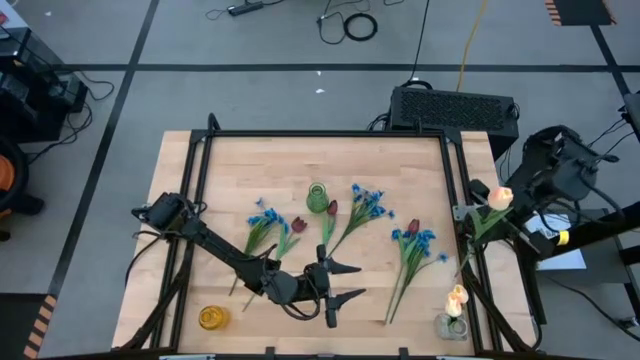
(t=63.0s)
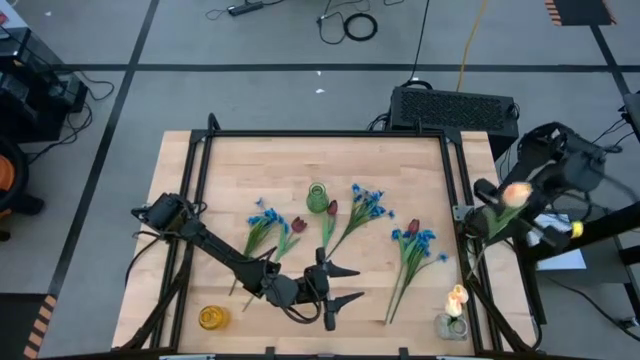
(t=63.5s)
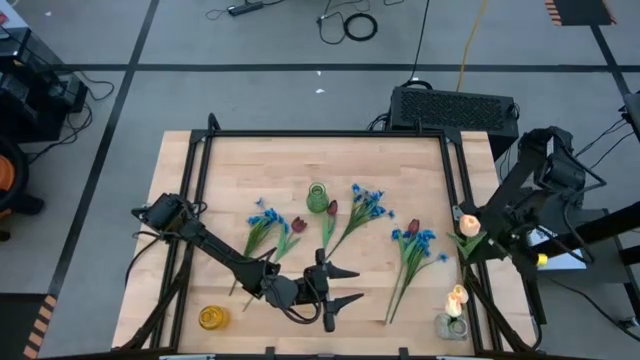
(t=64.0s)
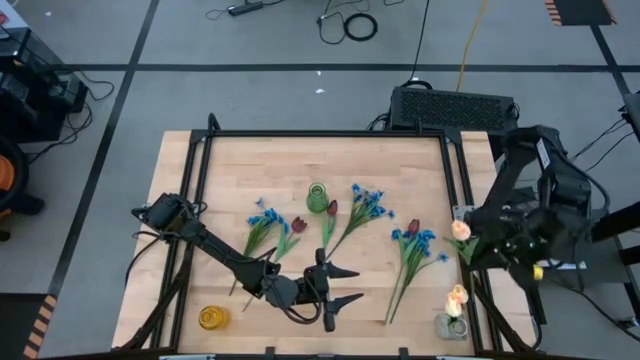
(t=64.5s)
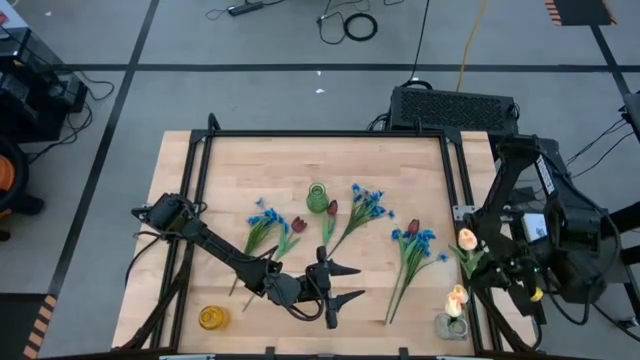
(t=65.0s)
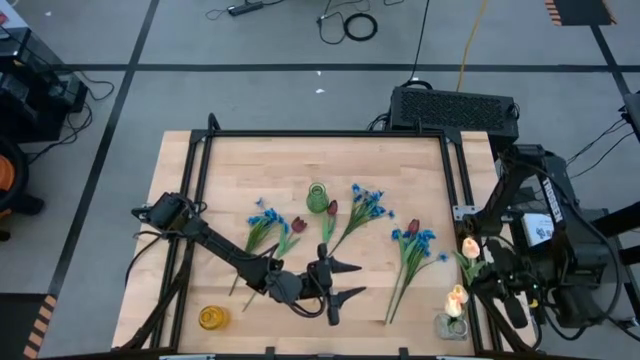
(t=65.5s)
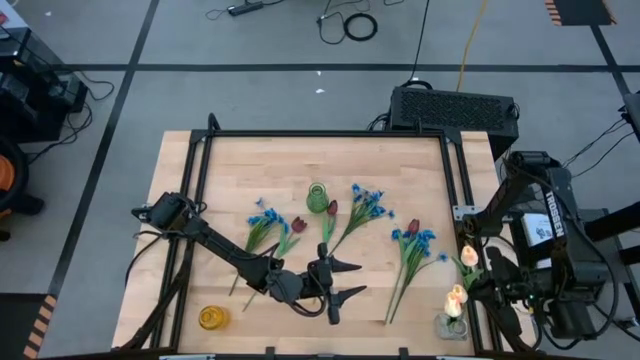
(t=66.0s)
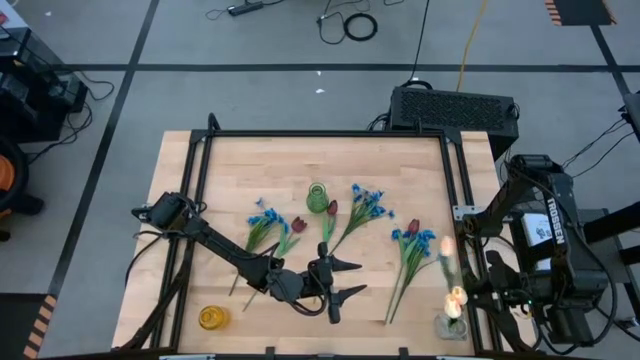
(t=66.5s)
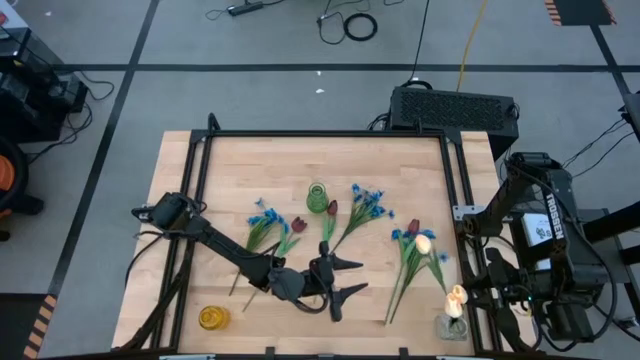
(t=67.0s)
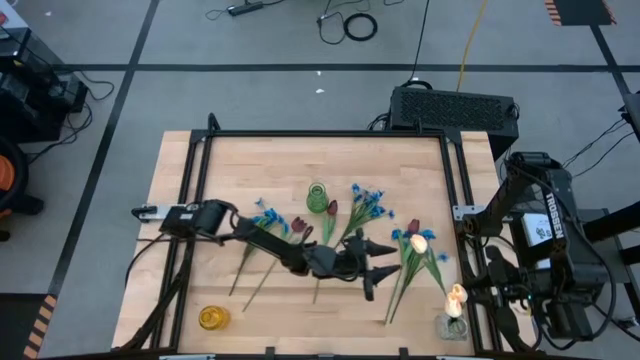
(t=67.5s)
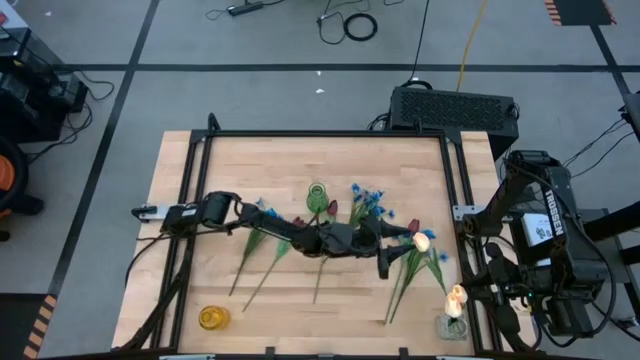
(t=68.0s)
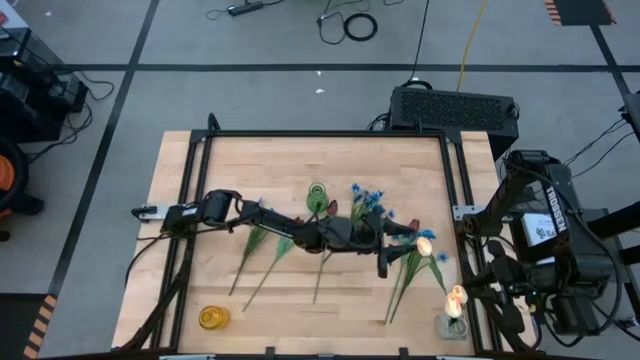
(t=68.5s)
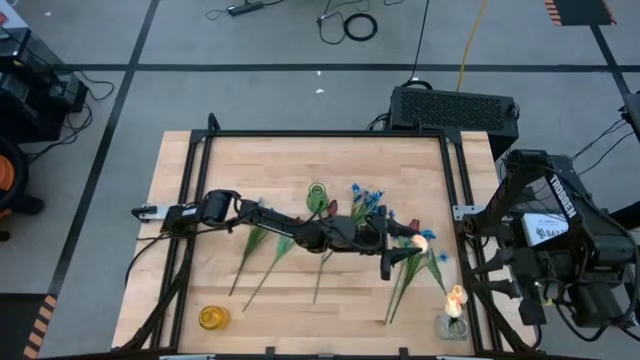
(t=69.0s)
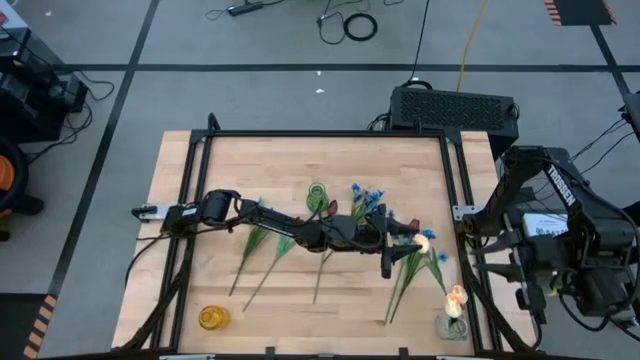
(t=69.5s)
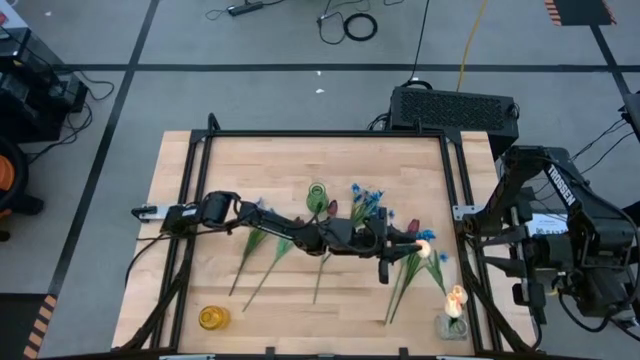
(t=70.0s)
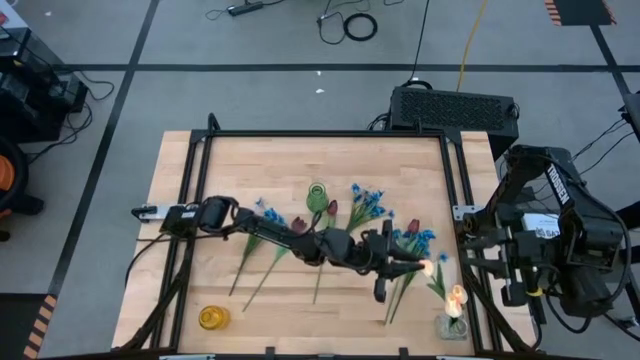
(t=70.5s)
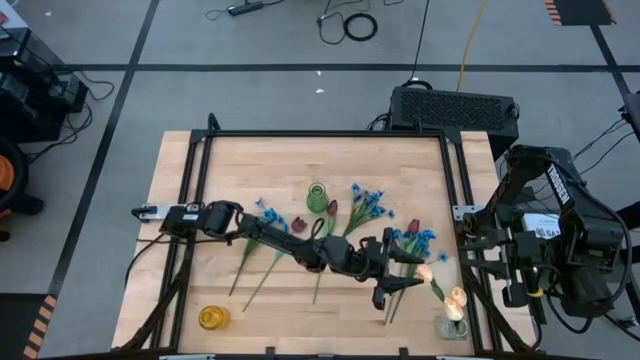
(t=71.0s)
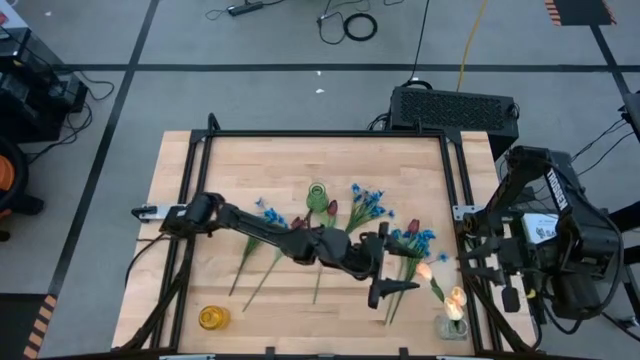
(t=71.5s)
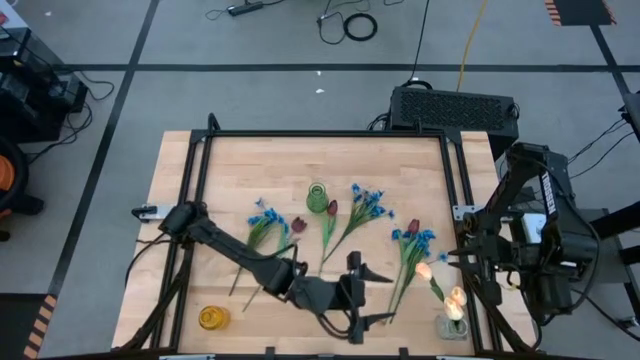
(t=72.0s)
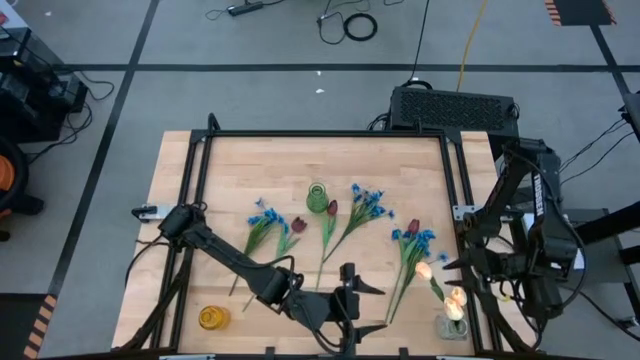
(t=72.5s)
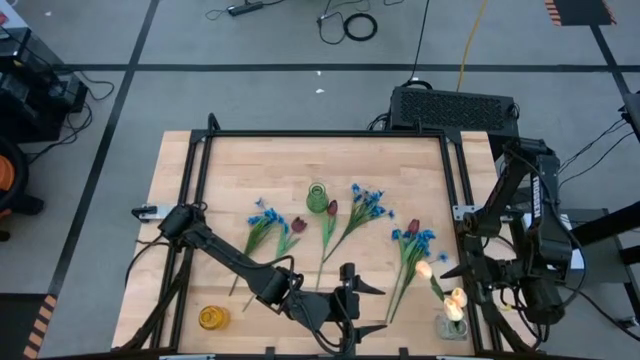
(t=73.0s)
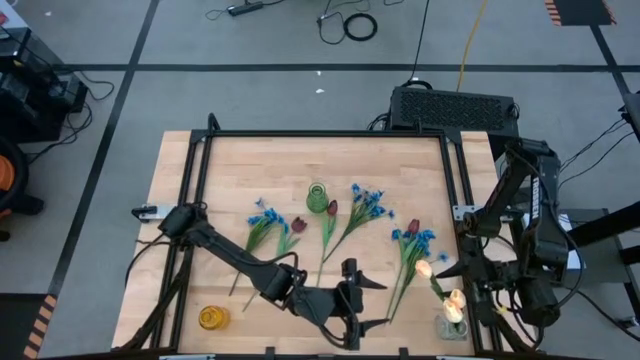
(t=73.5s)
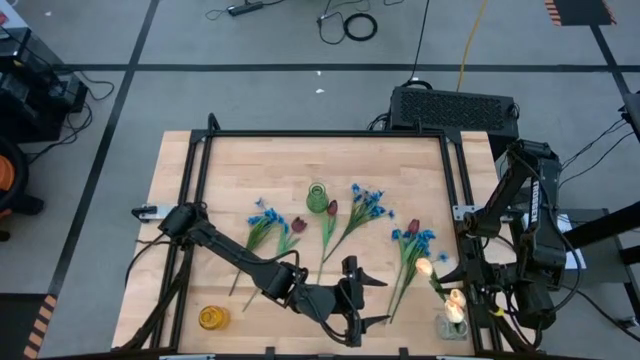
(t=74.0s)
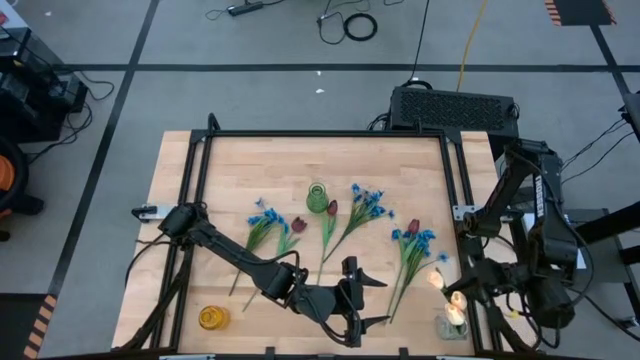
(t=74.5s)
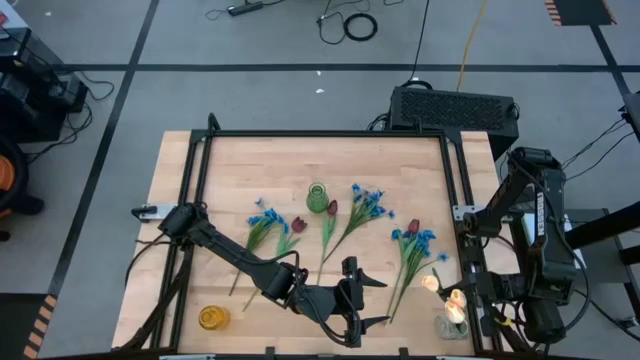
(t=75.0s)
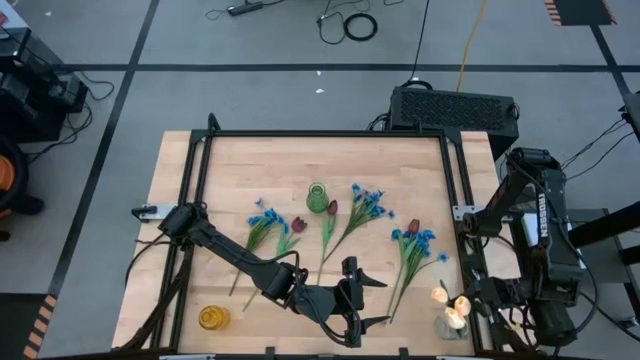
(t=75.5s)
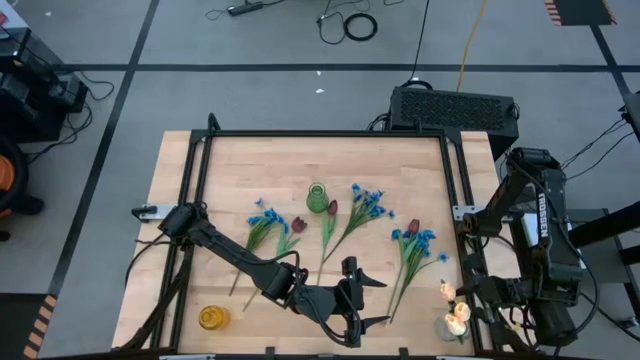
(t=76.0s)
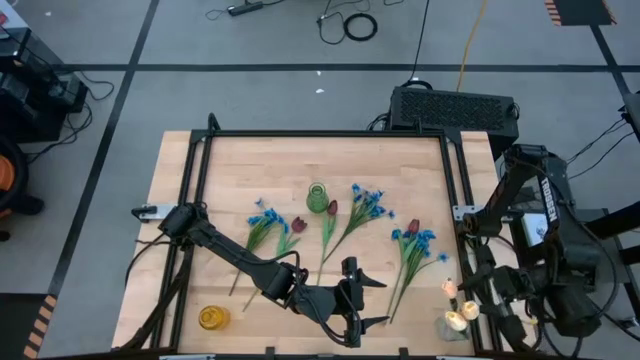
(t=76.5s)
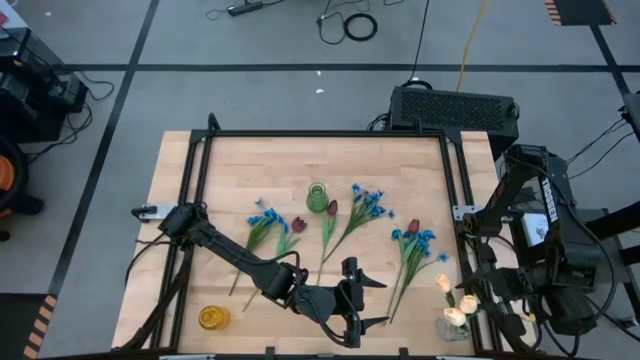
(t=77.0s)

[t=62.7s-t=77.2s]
Task: Sort flowers into vase by color
Put the yellow flower into the transparent vase

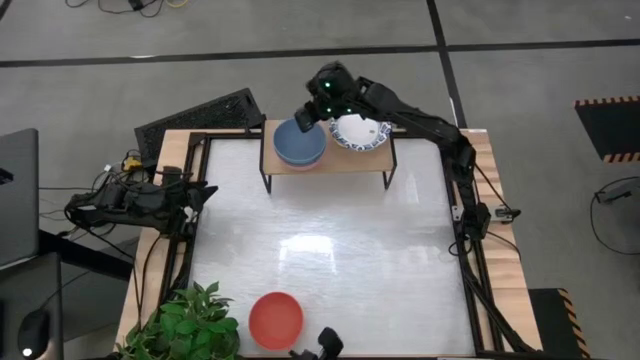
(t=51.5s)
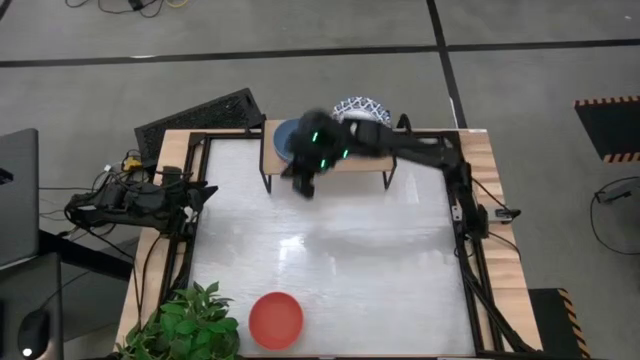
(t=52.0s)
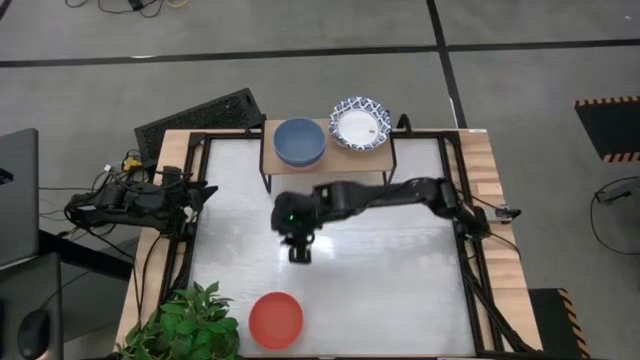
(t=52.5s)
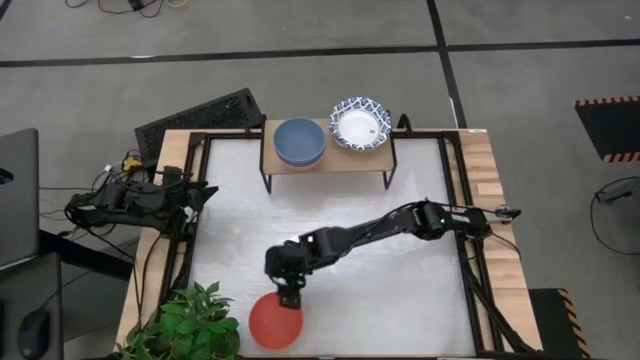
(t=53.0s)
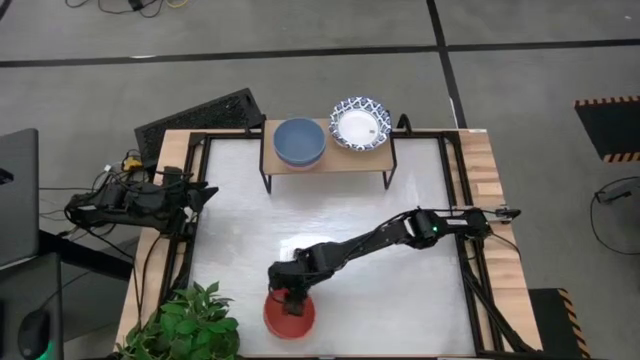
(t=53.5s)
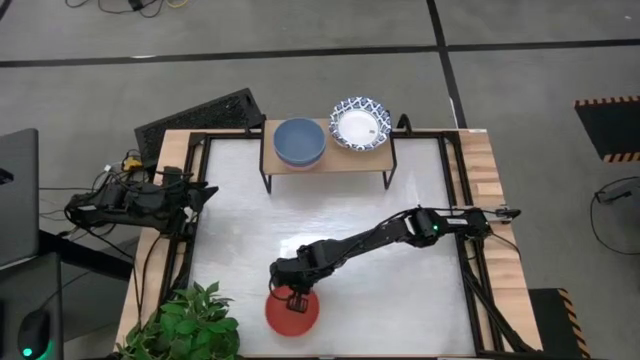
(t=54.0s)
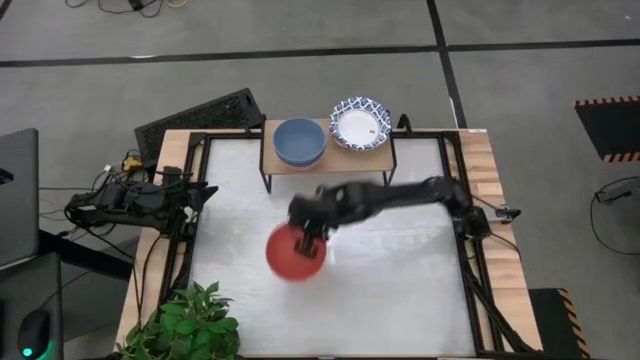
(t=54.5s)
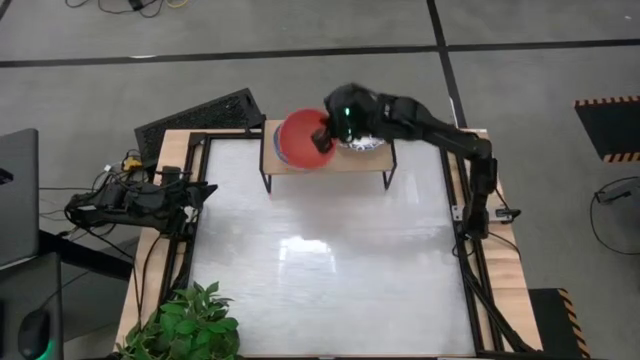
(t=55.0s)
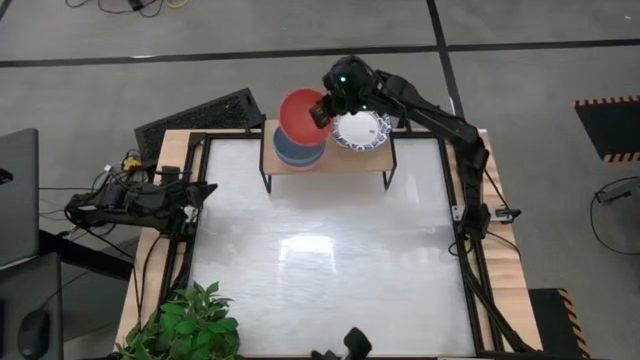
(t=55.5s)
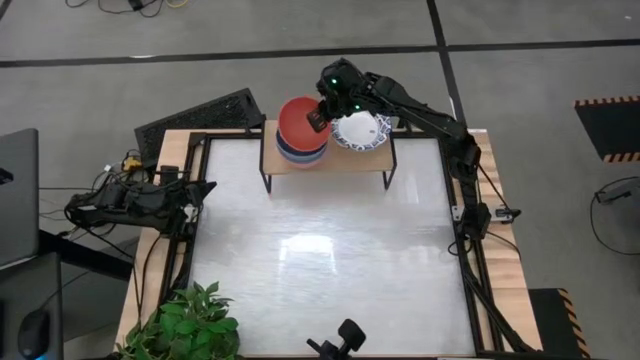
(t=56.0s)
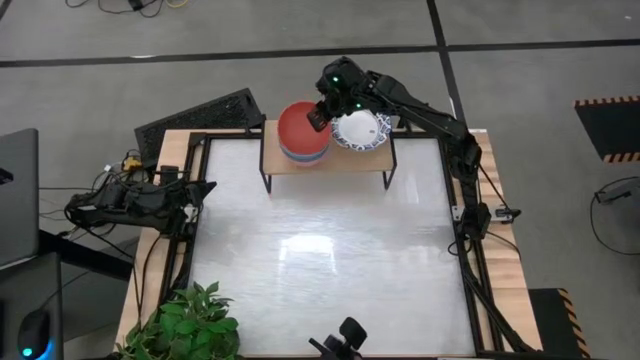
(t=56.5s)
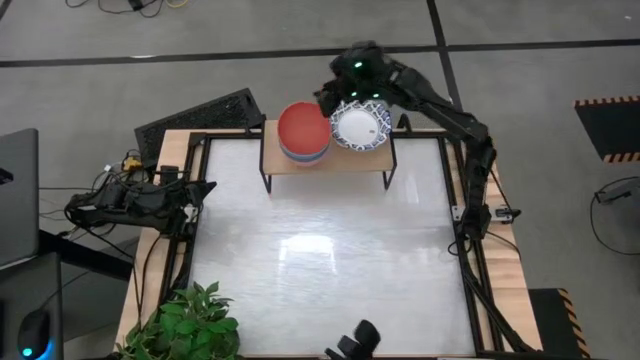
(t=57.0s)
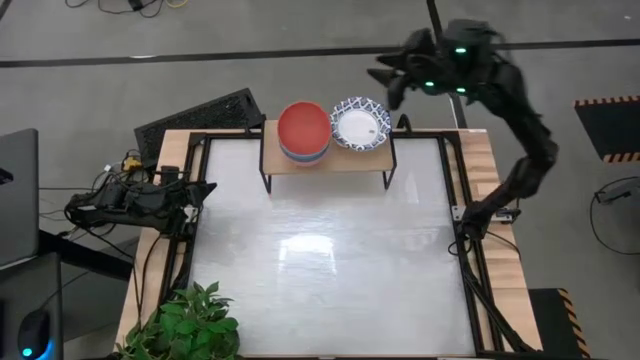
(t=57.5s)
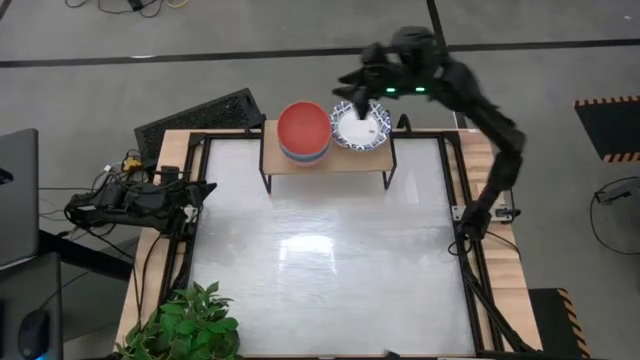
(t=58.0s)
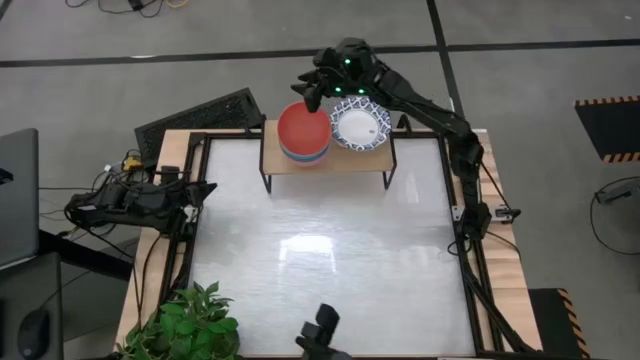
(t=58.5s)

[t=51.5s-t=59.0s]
Task: Place and stack bowls onto a shelf
Stack the orange bowl on top of the blue bowl on the shelf
